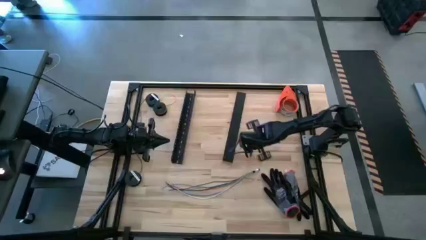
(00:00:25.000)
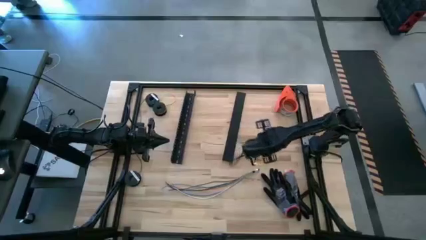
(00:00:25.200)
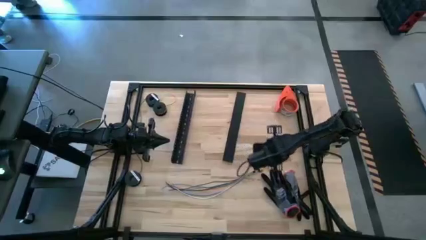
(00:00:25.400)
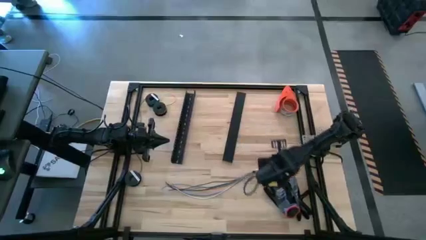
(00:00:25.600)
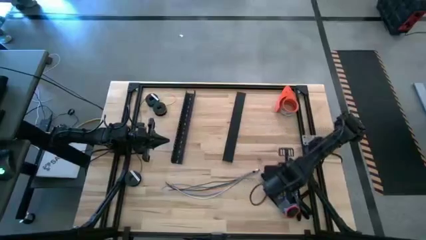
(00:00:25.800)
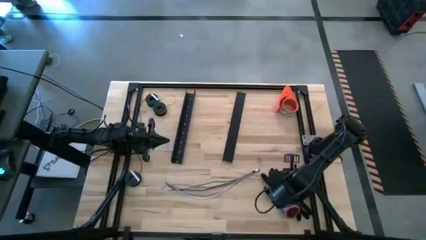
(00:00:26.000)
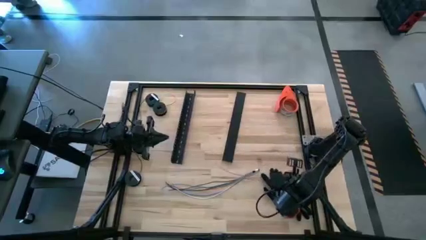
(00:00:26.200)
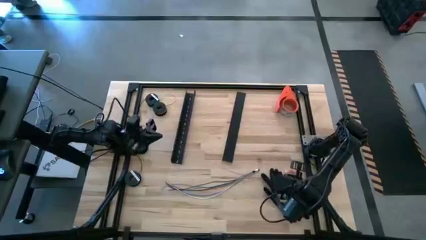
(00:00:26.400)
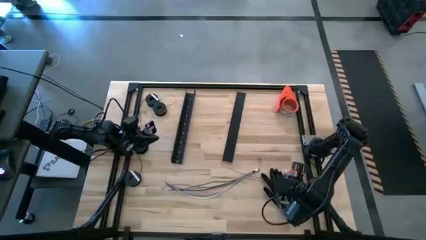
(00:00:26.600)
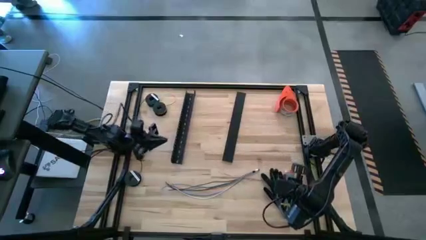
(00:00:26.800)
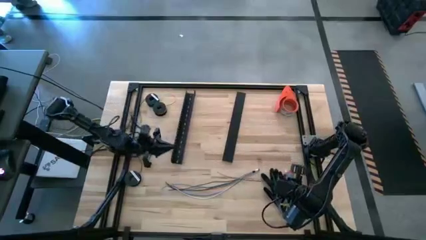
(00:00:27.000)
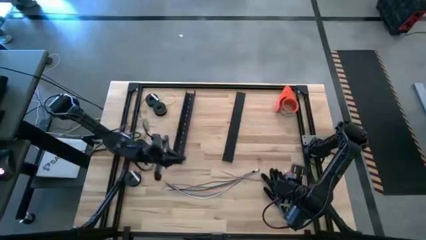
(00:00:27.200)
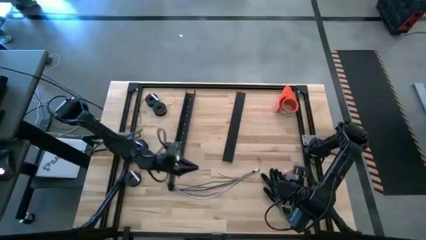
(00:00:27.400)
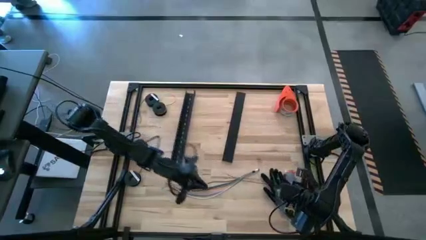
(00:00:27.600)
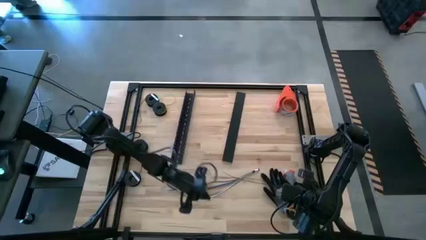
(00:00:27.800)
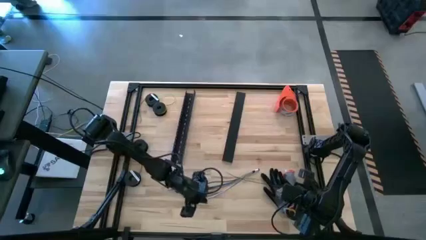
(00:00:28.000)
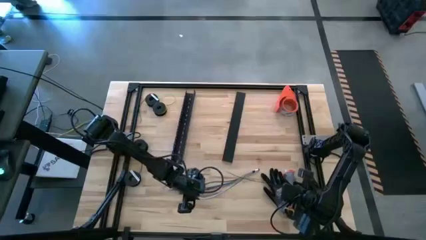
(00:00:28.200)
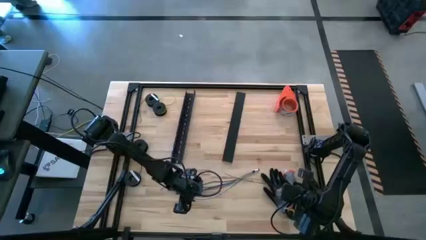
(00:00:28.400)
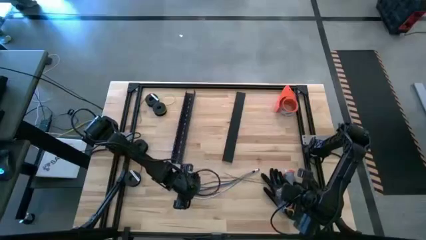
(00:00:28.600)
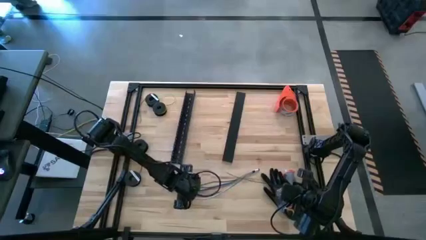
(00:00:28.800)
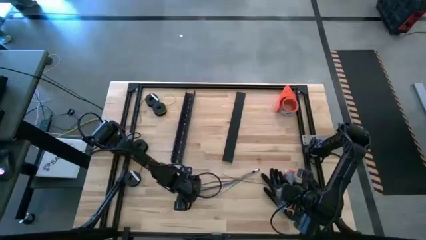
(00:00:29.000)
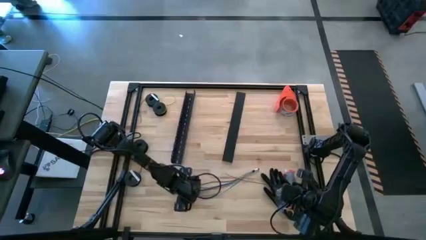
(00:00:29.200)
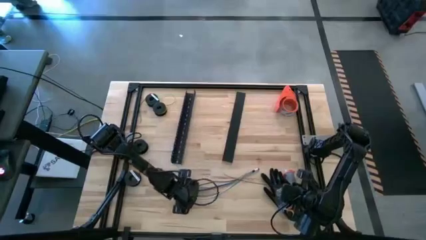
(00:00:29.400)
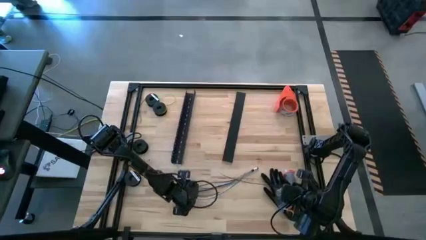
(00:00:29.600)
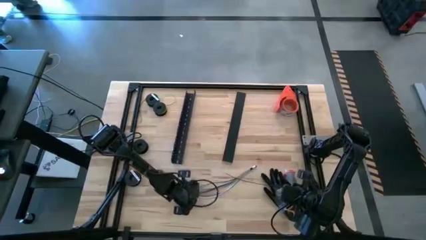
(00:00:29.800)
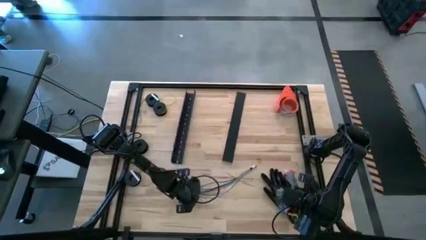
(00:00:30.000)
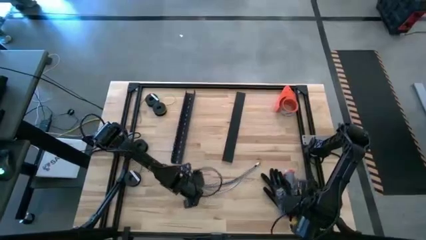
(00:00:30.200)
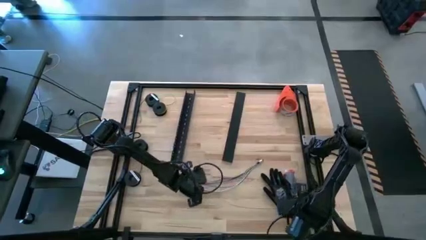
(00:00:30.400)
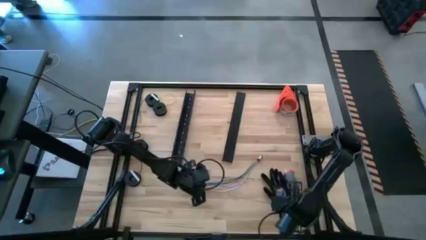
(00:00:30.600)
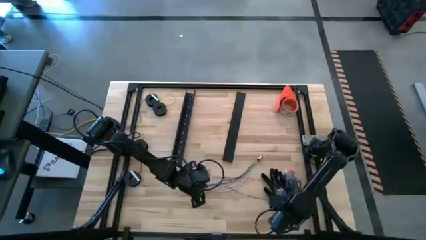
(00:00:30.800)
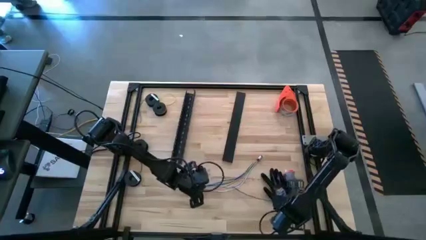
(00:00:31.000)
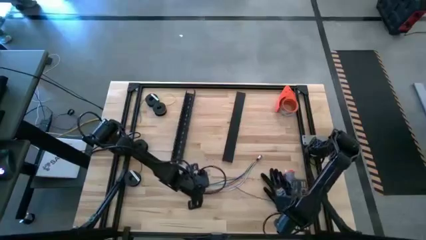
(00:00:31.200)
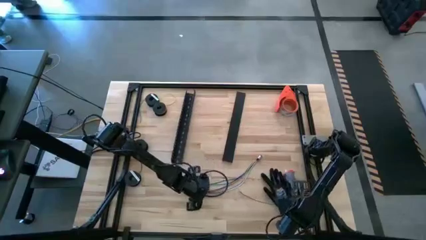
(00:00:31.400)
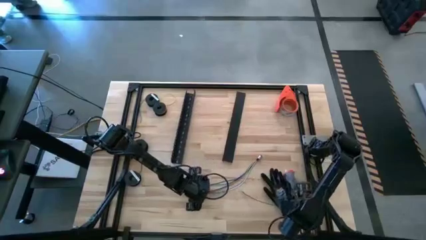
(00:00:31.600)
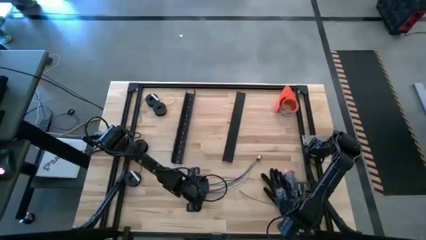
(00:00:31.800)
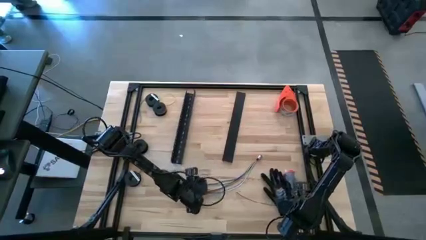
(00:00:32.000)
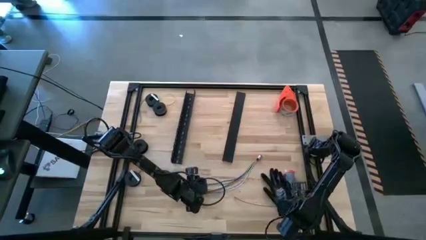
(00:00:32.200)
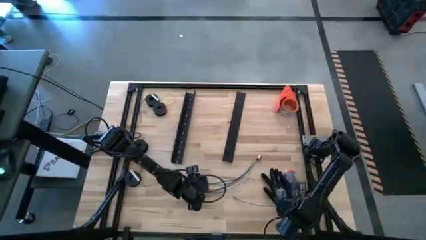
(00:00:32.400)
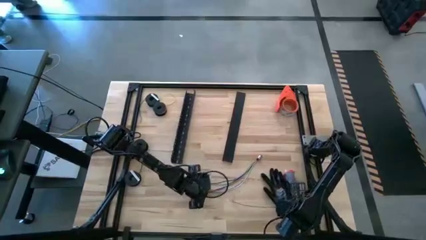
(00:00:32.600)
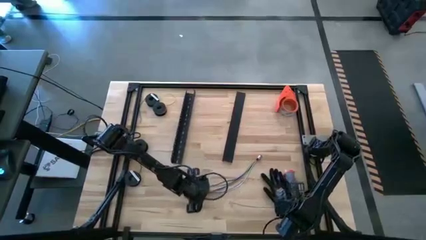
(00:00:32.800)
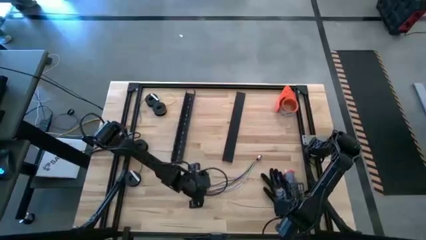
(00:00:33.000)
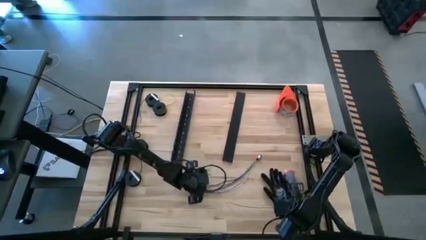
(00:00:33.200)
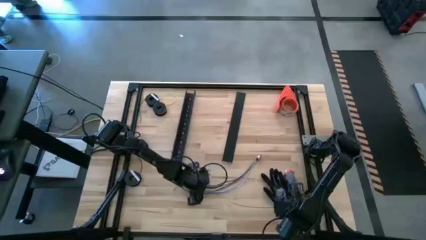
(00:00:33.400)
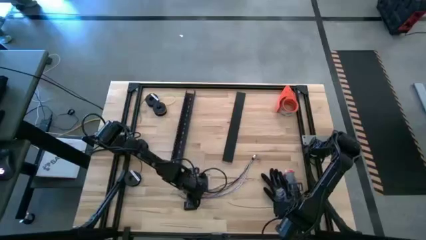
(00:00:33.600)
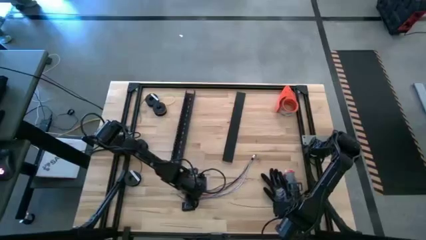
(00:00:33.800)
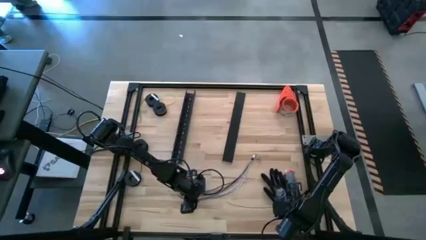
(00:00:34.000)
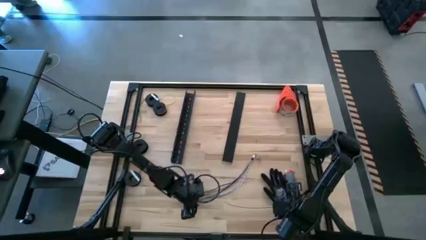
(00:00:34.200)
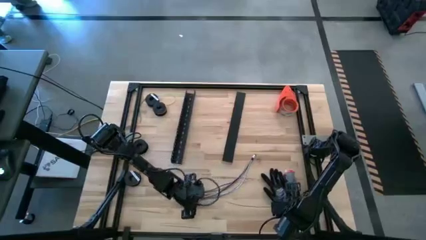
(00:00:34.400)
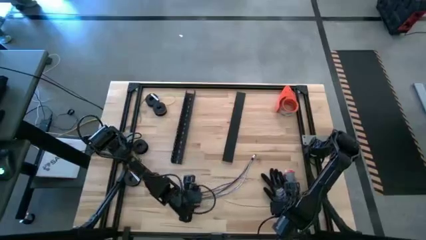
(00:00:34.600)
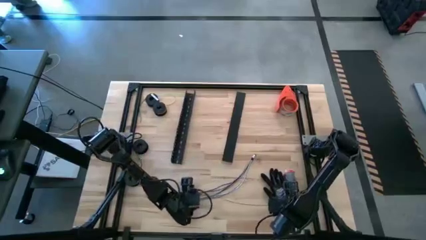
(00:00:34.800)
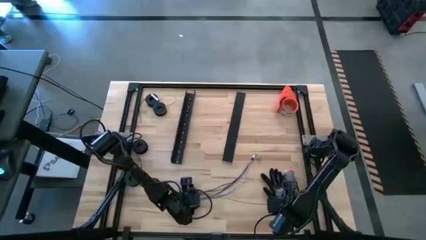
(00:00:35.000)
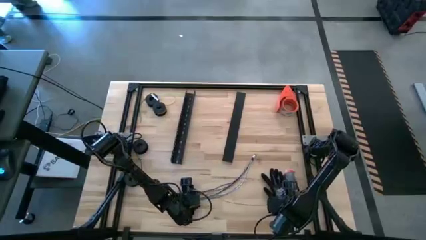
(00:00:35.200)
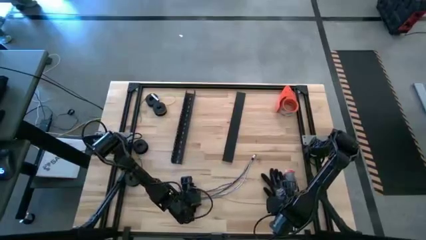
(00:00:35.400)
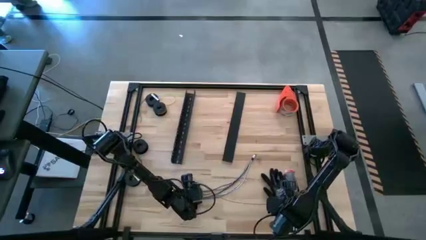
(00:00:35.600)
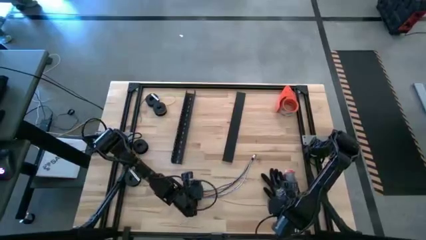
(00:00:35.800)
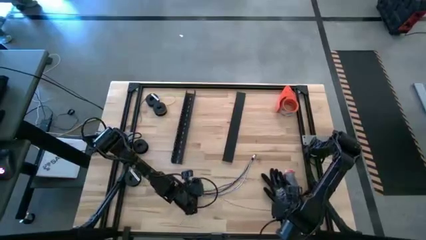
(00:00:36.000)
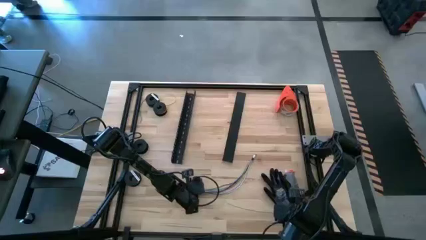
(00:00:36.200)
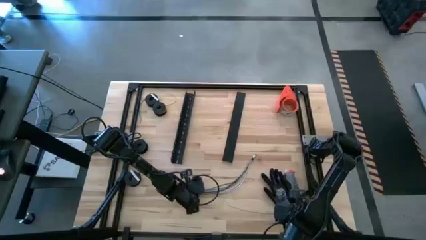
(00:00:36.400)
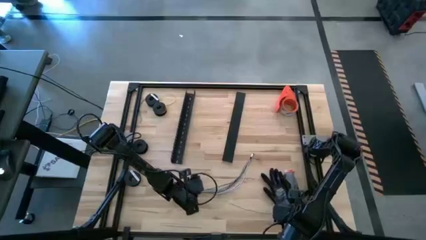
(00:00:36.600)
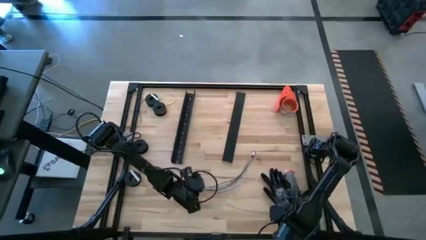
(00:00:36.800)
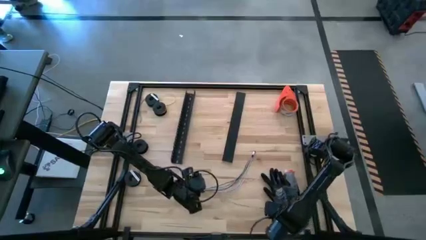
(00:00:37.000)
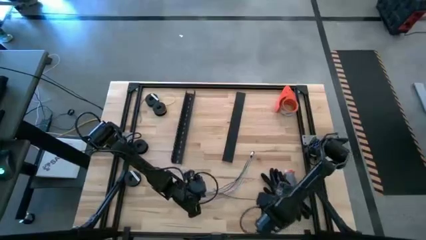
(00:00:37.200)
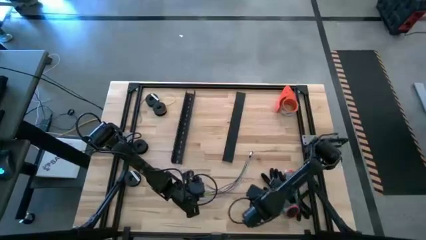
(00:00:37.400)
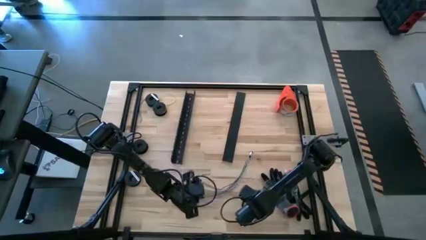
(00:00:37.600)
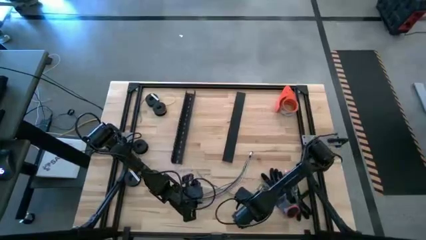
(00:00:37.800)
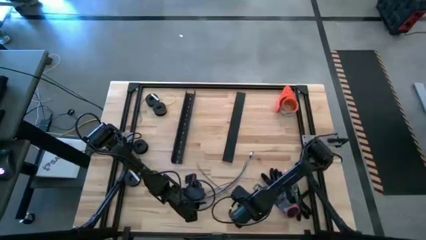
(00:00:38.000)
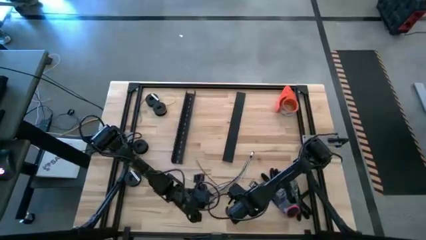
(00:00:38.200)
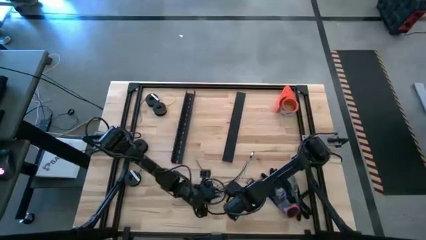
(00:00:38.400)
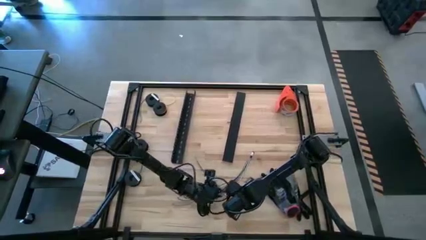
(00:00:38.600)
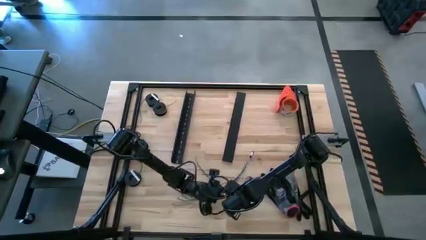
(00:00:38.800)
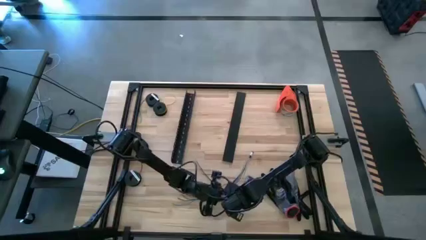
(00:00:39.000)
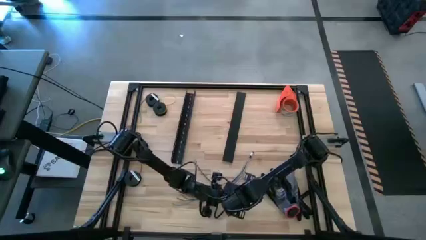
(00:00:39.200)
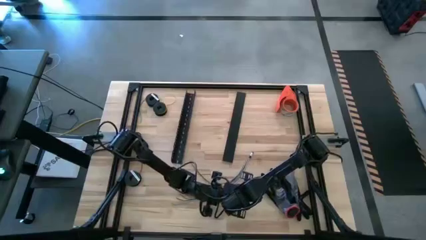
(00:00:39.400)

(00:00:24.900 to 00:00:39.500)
Task: Ziptie cables
Wrap the cable wires using zip tie

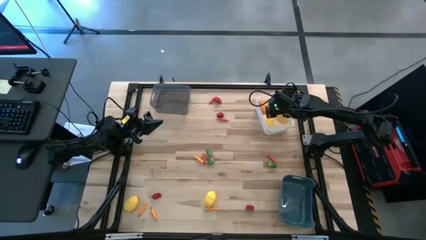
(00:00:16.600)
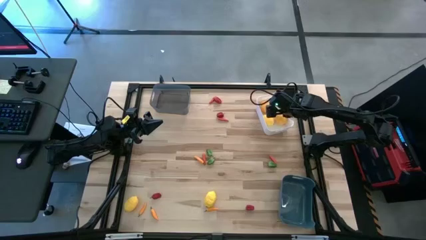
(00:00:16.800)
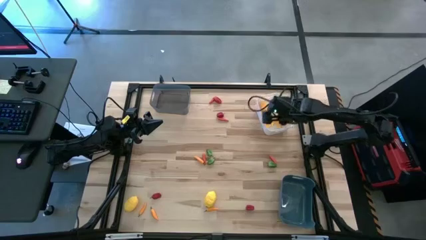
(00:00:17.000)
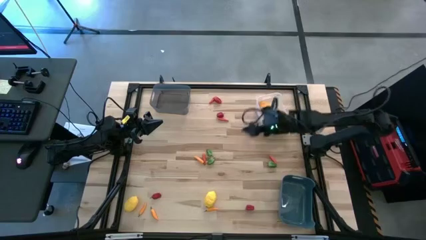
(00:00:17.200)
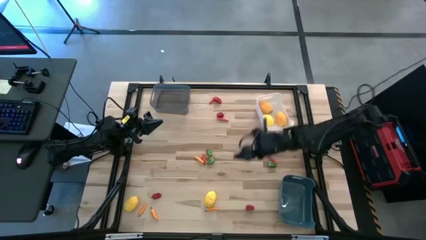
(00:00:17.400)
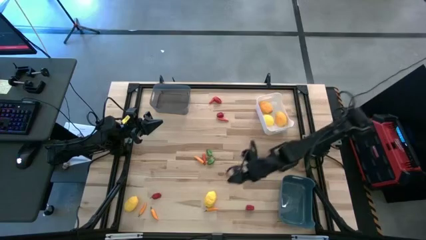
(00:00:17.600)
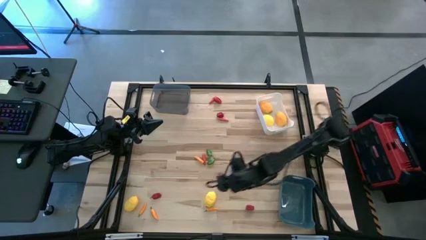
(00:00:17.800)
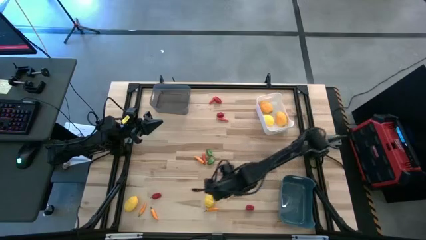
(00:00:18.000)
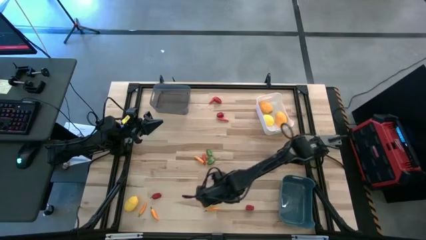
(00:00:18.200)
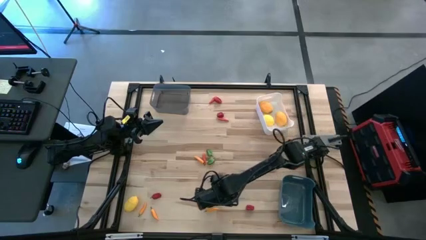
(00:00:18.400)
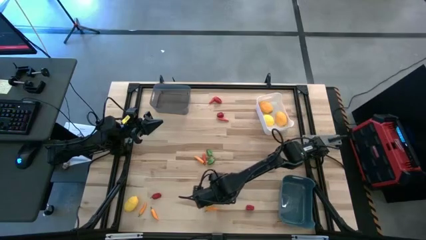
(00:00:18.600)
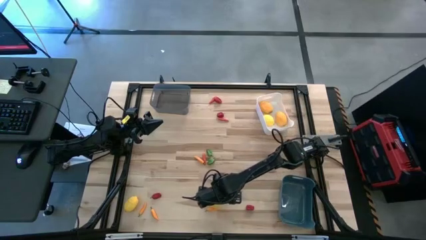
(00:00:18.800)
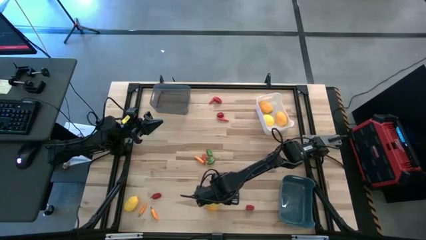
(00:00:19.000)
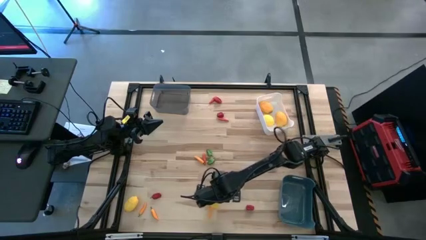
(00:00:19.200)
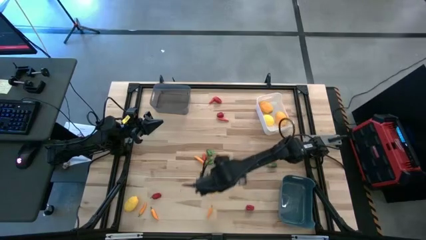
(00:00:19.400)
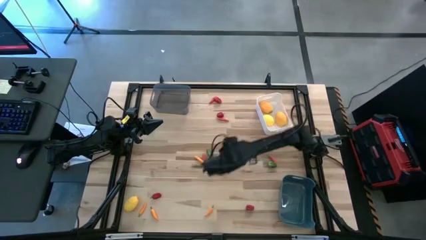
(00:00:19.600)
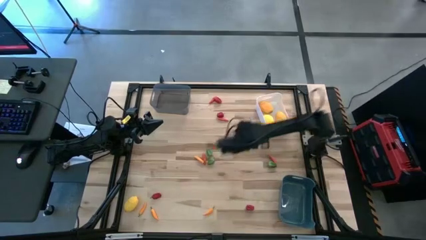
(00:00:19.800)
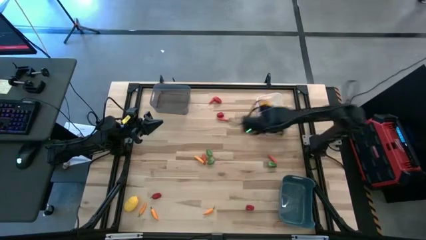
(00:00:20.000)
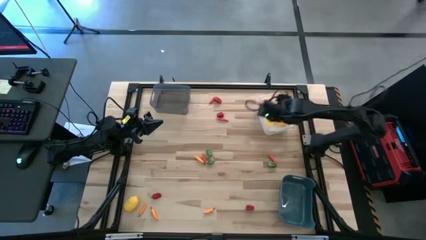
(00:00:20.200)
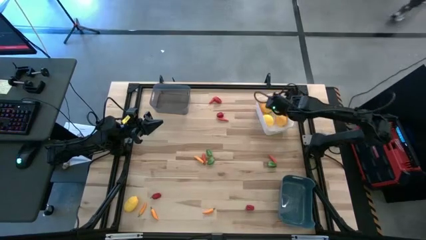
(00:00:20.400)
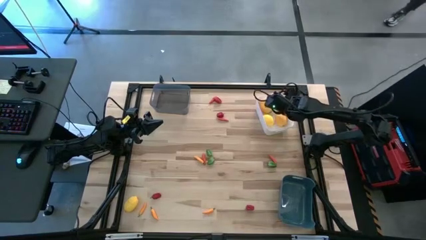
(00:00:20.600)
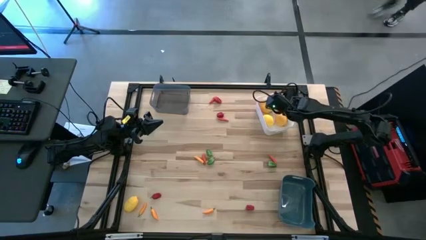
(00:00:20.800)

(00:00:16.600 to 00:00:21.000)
Task: Sort produce into baskets
Put the lemon into the white bin
